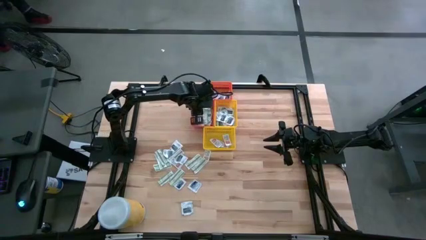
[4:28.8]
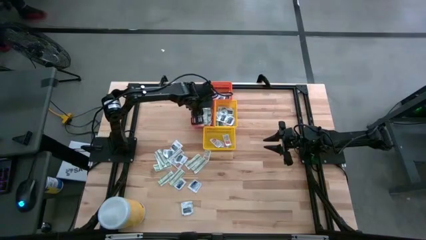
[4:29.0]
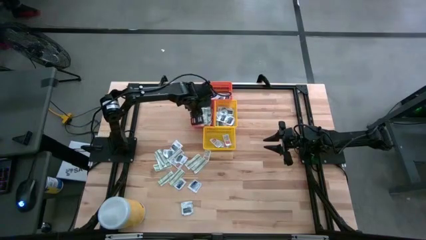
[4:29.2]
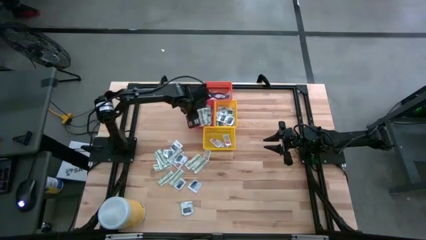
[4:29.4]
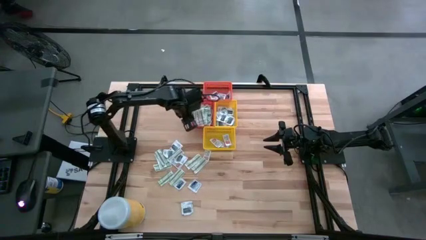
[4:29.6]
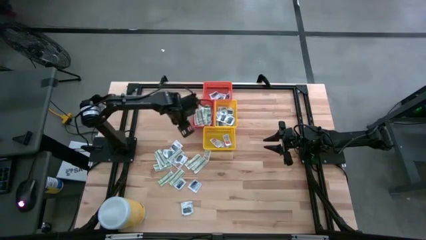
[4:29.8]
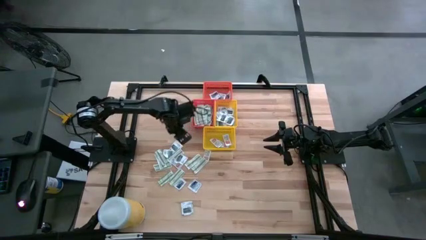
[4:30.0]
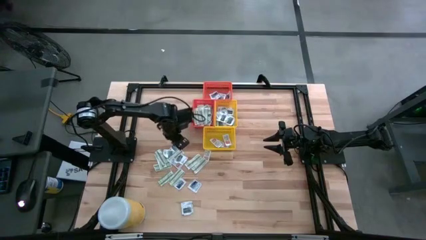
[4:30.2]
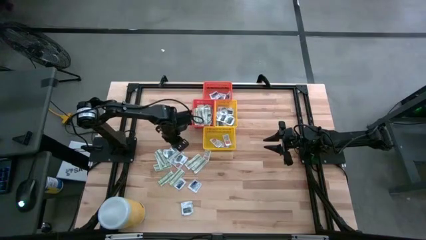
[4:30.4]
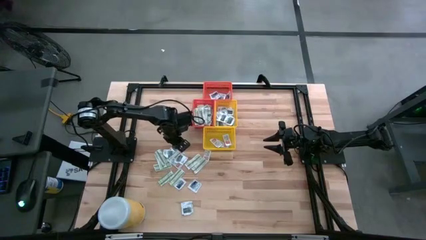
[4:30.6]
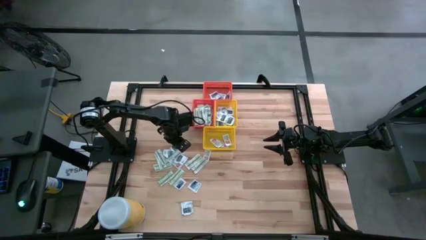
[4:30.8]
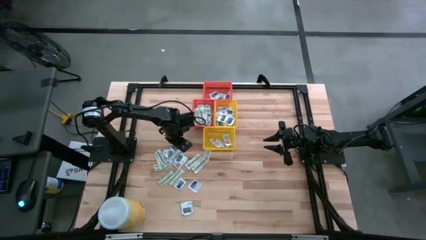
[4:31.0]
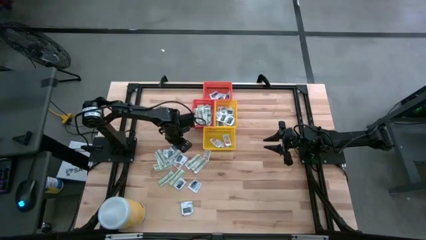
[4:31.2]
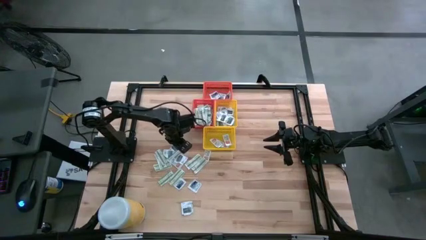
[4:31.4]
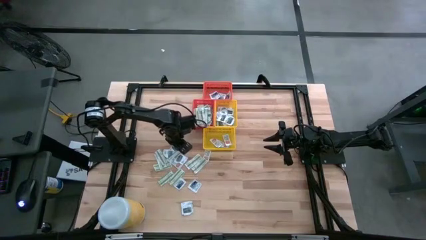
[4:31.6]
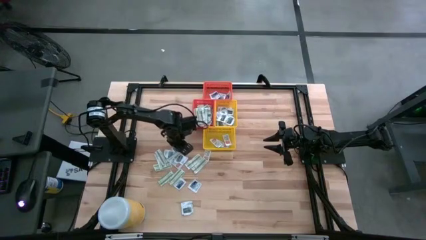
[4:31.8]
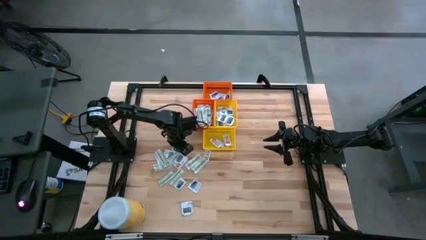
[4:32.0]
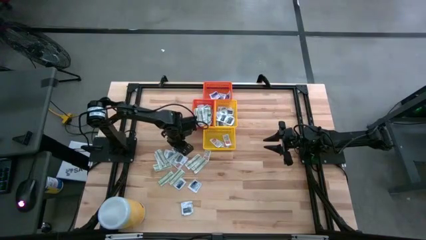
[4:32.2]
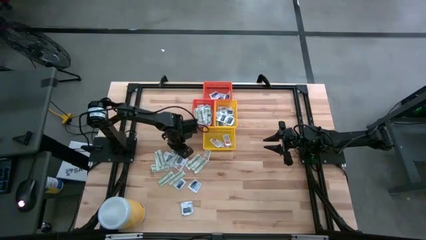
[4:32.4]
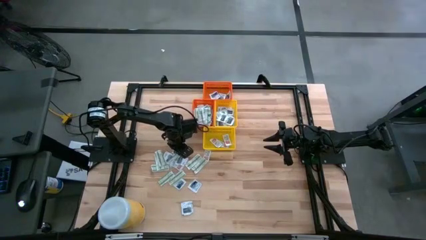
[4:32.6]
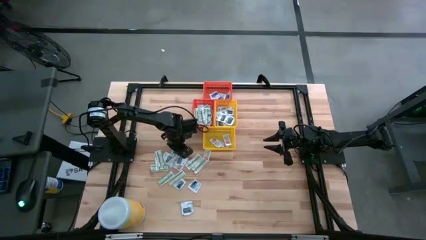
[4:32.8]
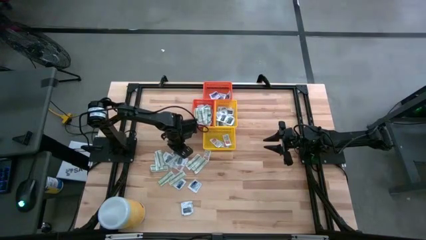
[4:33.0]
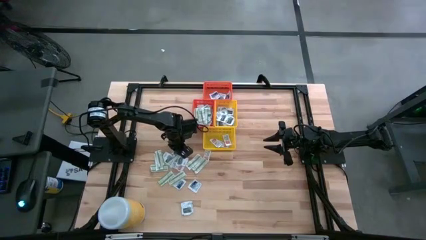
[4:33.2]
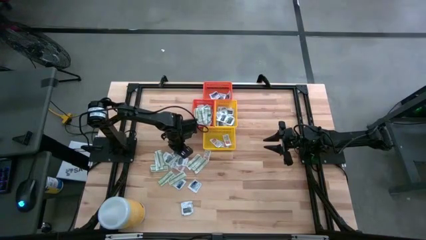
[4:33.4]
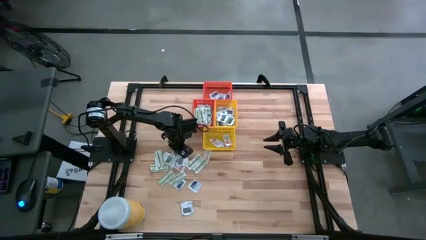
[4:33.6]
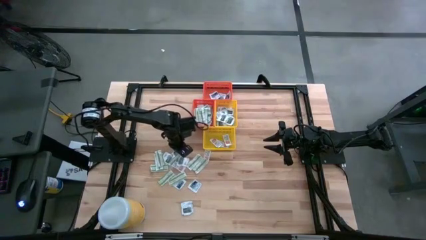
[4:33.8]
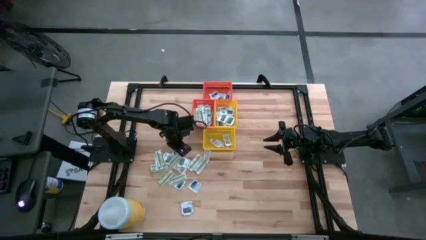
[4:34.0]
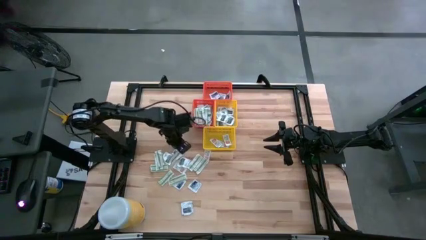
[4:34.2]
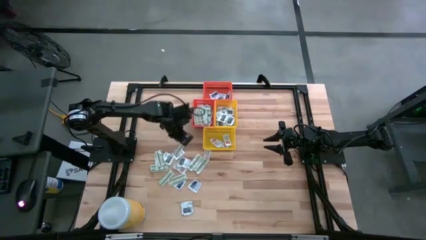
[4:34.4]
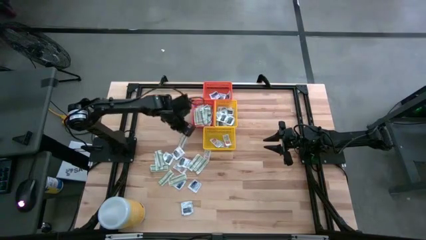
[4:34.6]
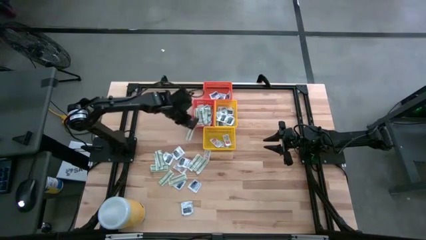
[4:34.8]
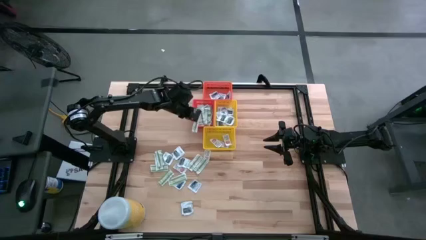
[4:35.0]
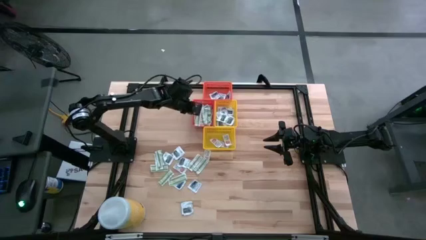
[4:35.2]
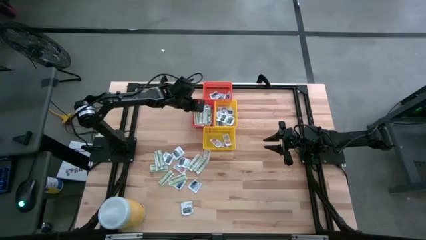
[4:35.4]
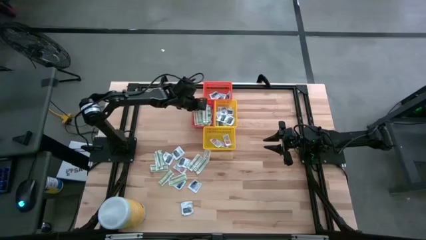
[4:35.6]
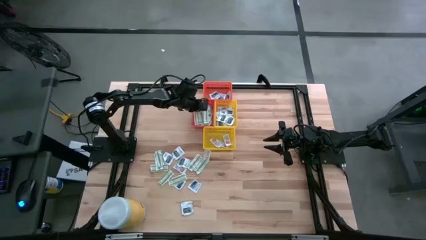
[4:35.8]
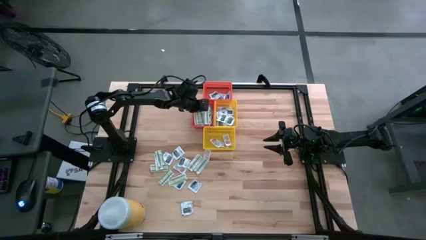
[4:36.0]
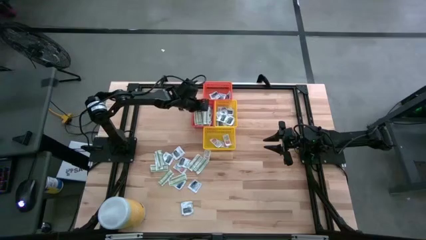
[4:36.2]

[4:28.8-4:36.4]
Task: Pick & Place First Aid Supplies
Put the bandage into the bottom orange bin

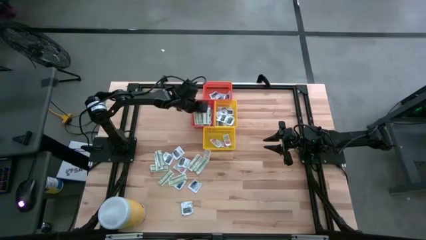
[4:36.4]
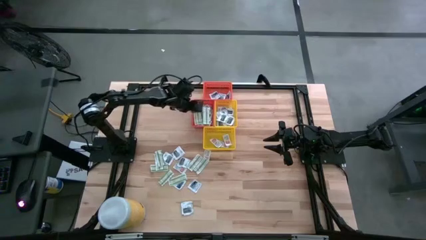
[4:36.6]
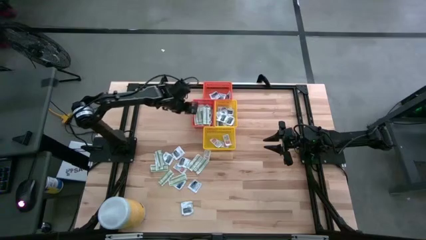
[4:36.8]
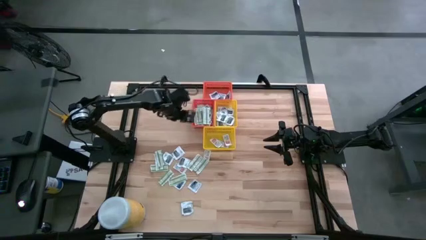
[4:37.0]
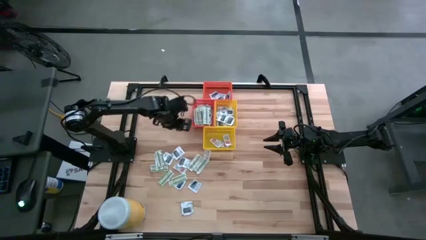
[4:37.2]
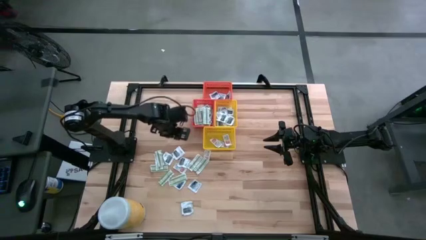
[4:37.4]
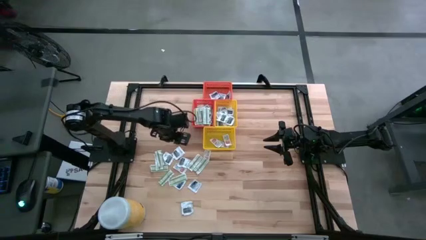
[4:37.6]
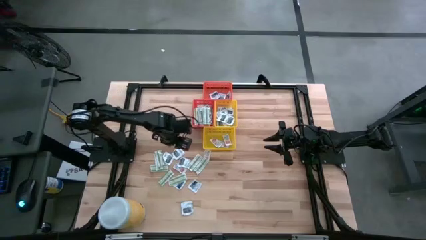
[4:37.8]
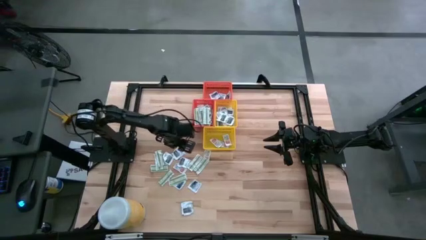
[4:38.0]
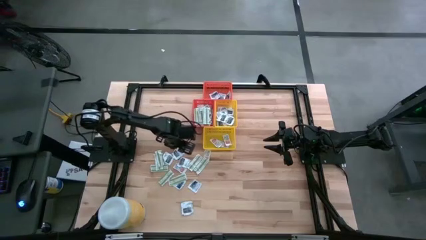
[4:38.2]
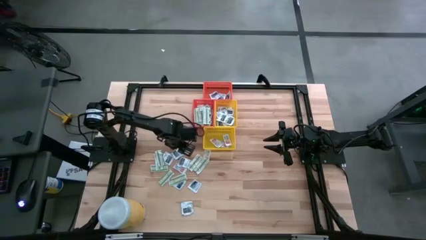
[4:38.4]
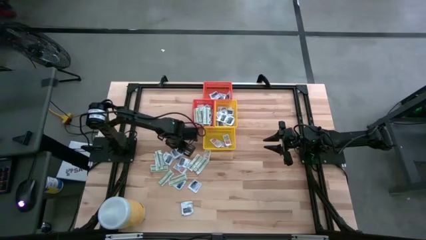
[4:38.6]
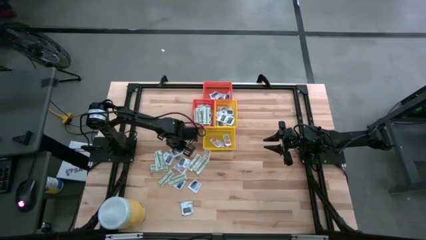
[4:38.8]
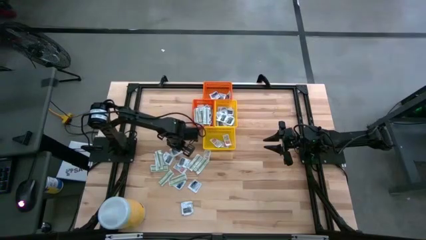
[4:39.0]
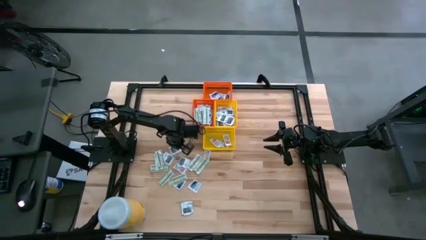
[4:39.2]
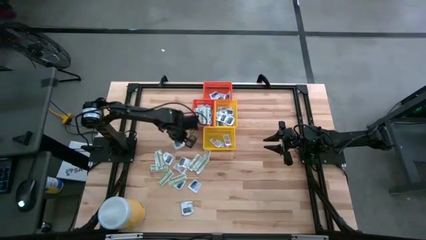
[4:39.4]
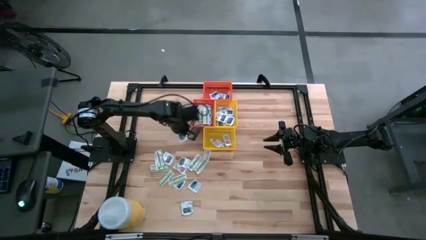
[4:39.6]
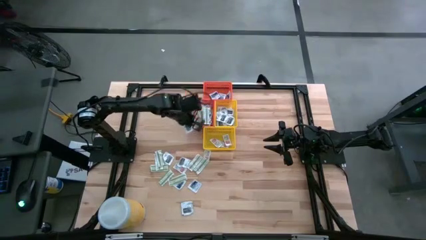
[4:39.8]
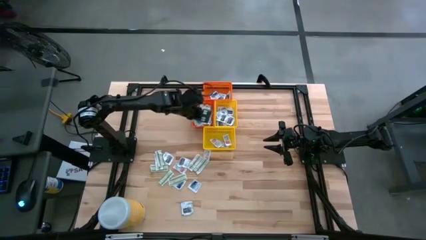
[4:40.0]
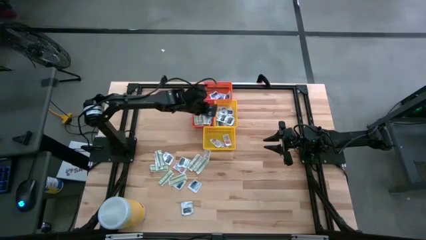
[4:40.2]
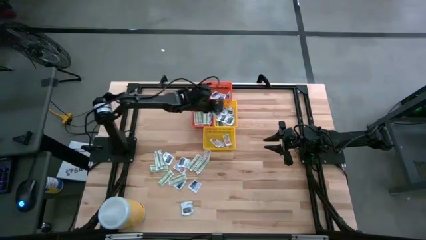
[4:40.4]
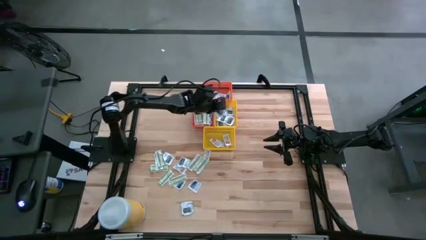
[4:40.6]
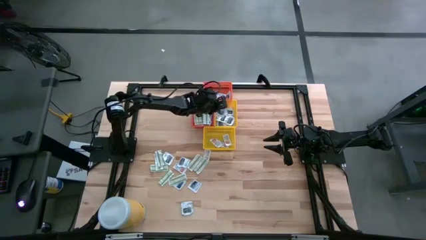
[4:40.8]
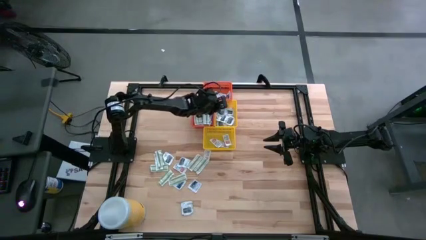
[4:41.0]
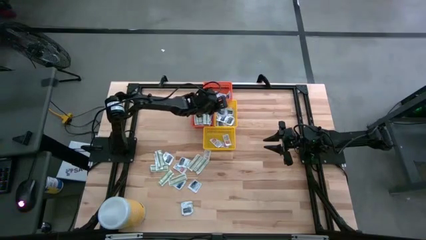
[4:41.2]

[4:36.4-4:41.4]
Put the towelette pack into the top yellow bin

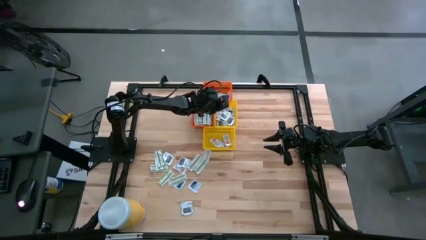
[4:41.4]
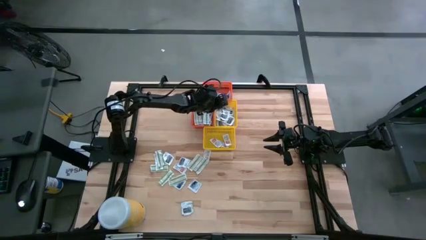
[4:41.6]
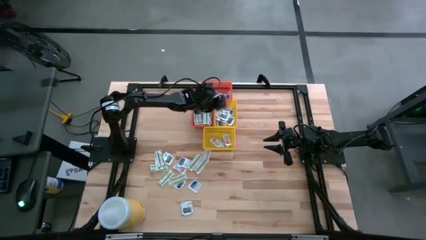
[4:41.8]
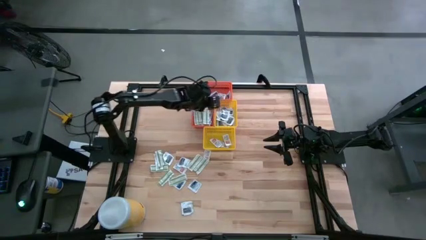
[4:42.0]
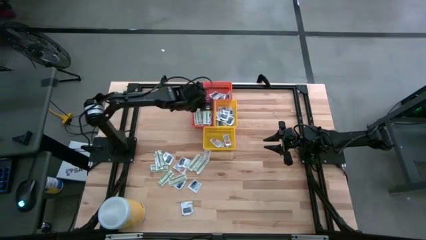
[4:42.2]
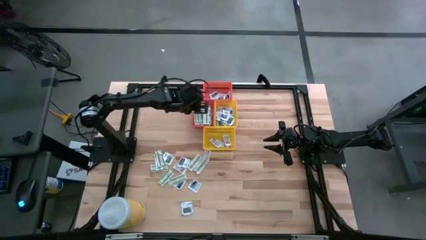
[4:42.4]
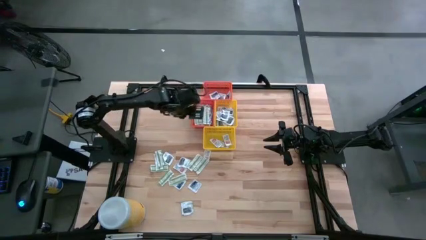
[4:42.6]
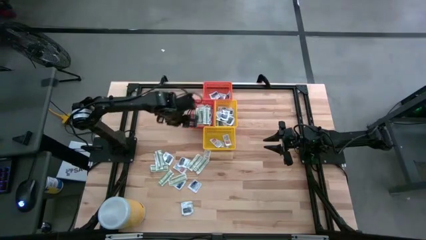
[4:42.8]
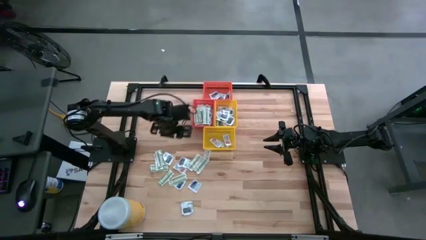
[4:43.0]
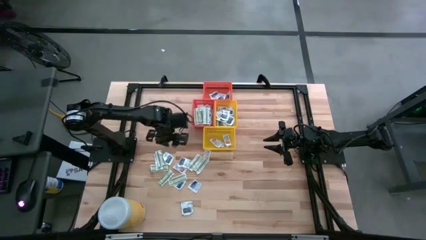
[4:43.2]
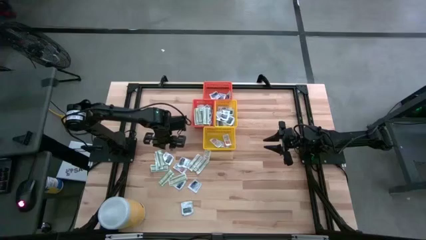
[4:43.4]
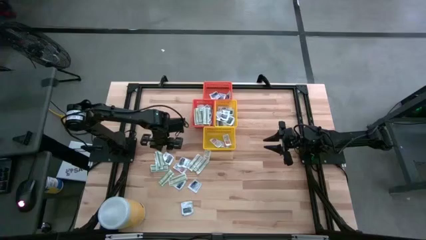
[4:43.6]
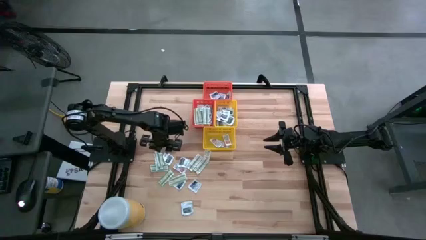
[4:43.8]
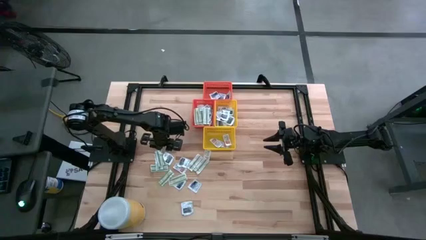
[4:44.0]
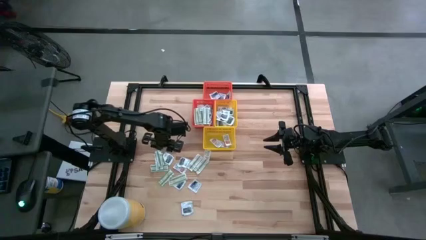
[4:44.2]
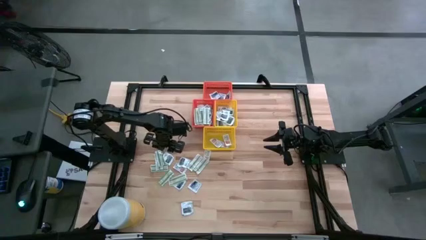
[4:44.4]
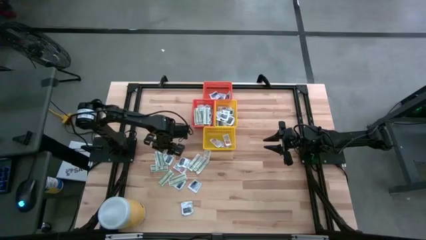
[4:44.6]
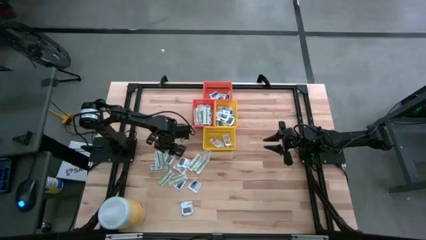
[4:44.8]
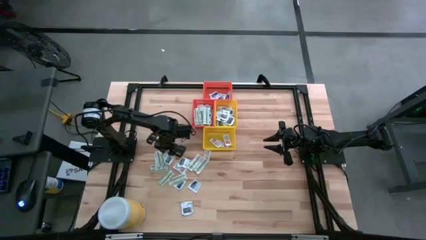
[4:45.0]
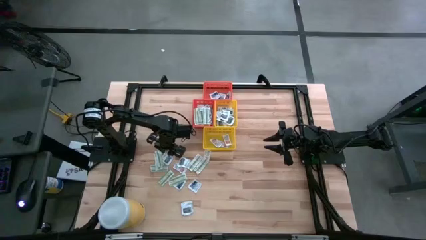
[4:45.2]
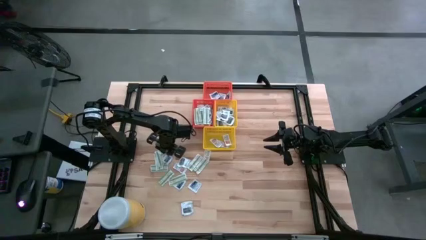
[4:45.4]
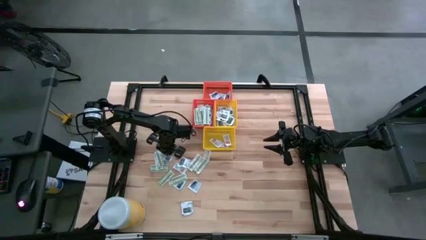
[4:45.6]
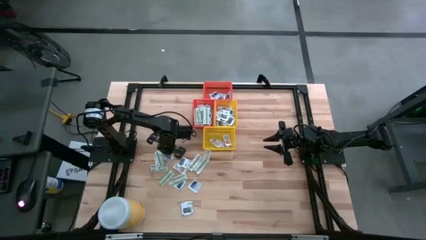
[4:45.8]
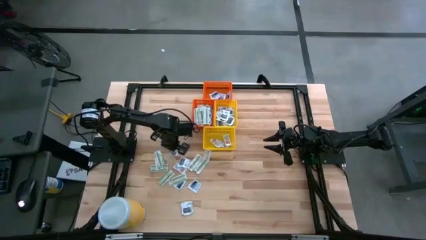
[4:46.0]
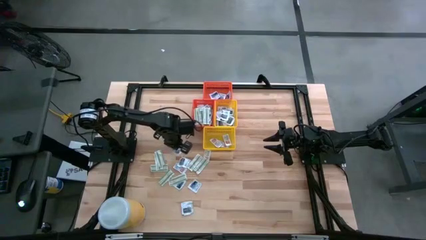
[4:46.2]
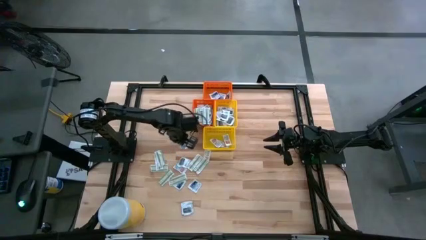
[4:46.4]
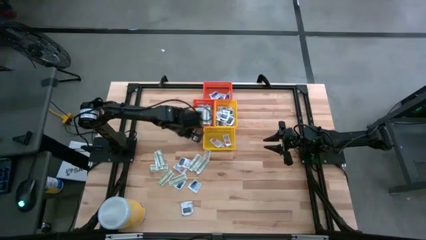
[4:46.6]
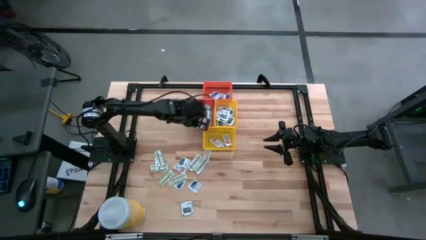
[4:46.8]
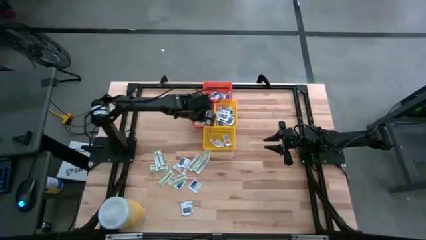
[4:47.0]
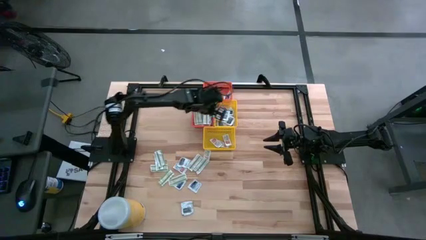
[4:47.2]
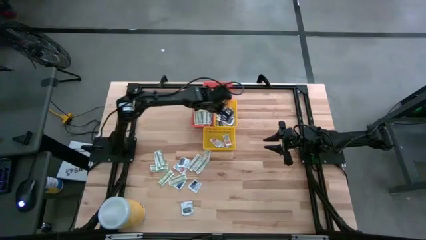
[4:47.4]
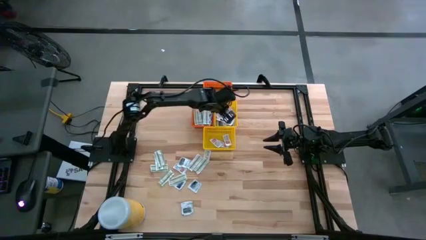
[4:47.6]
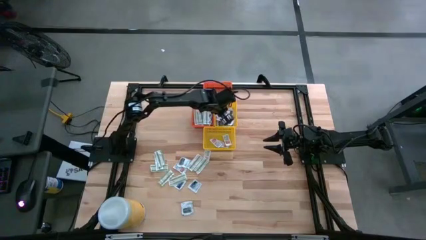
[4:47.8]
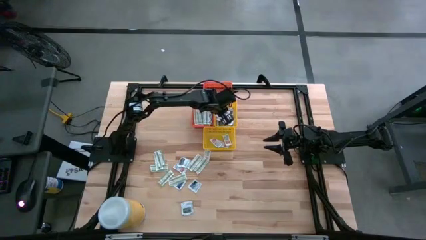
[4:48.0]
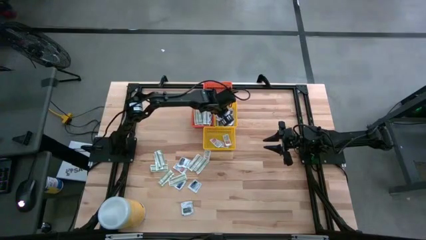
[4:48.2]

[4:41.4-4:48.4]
Put the towelette pack into the top yellow bin
